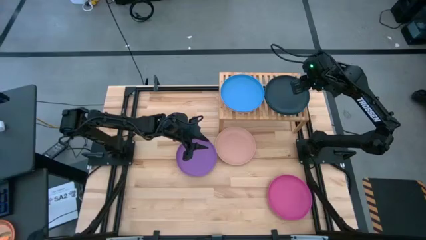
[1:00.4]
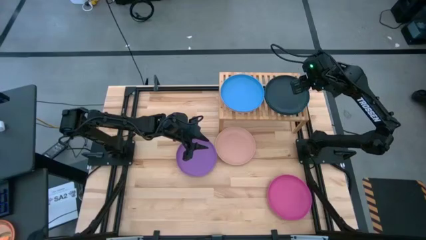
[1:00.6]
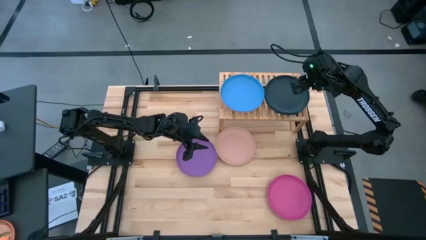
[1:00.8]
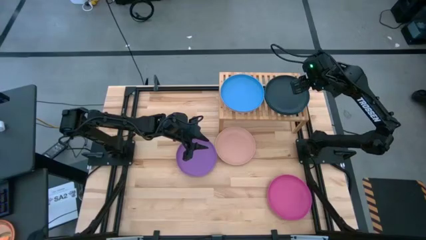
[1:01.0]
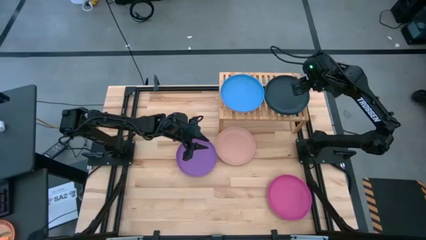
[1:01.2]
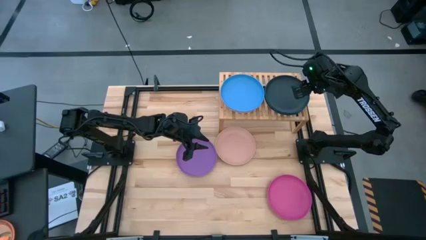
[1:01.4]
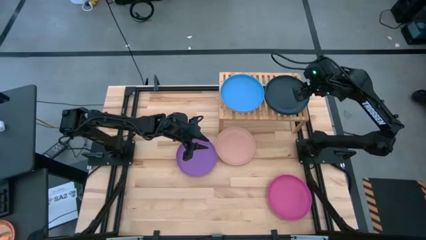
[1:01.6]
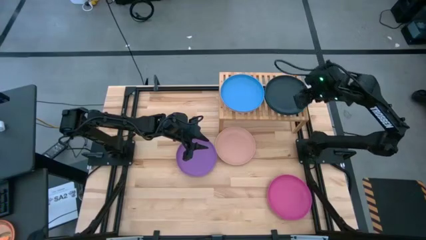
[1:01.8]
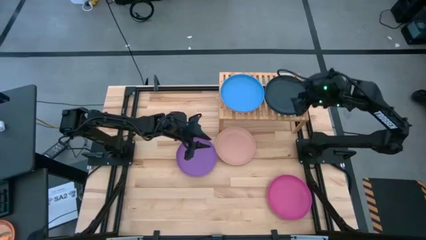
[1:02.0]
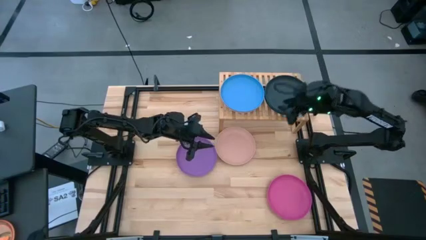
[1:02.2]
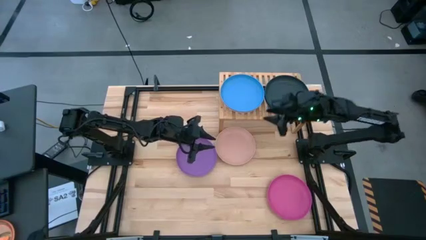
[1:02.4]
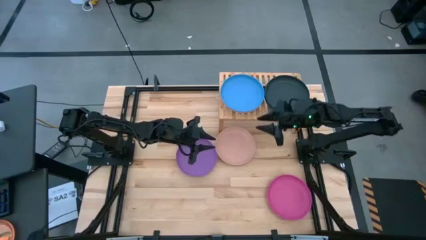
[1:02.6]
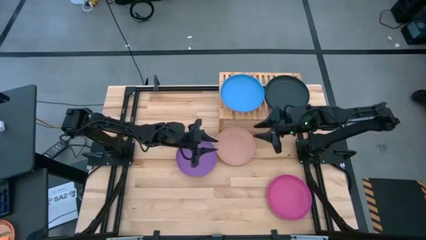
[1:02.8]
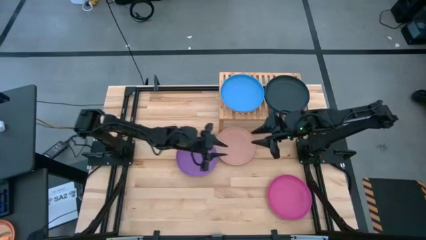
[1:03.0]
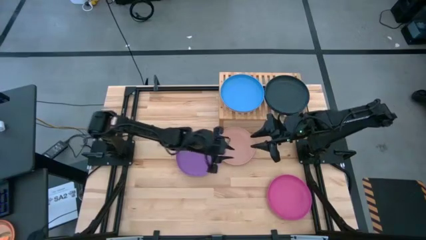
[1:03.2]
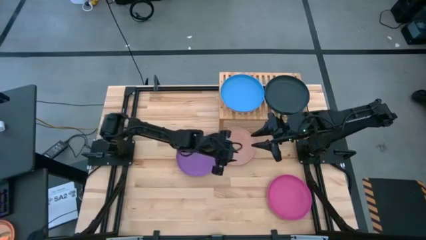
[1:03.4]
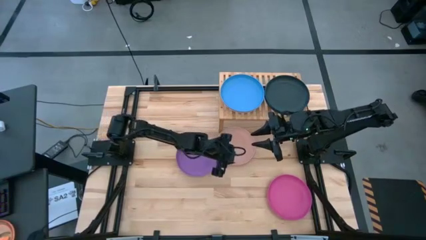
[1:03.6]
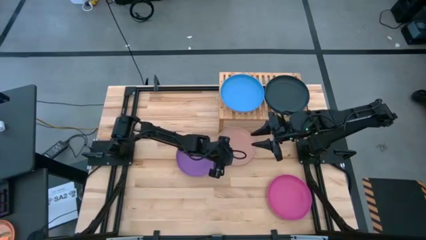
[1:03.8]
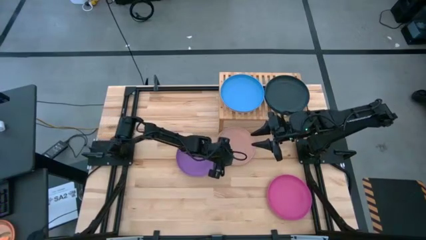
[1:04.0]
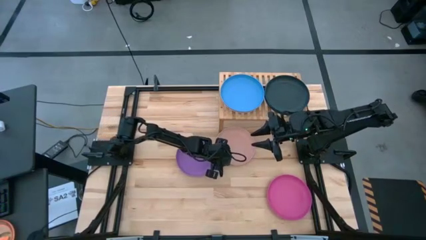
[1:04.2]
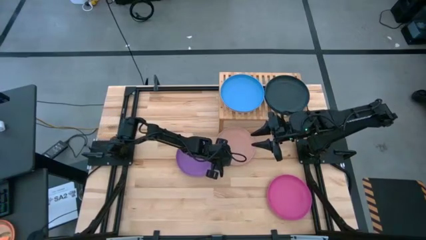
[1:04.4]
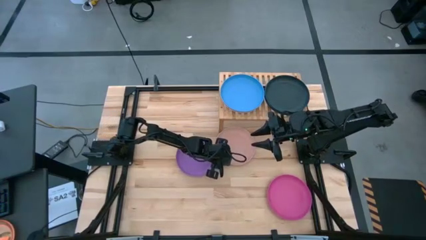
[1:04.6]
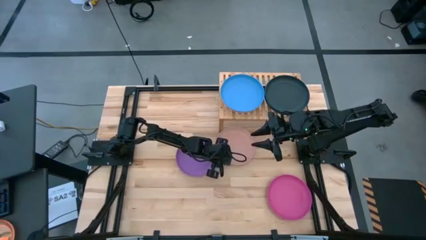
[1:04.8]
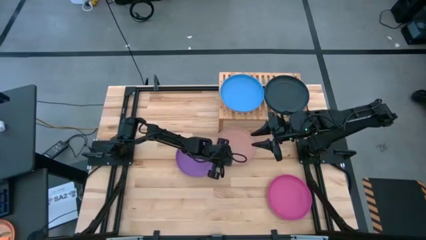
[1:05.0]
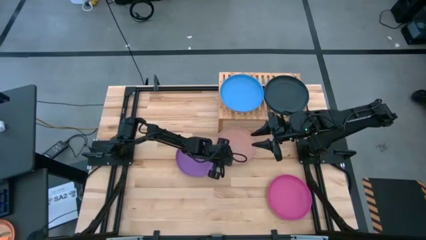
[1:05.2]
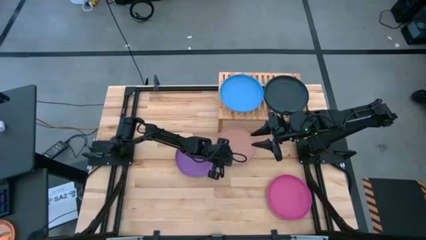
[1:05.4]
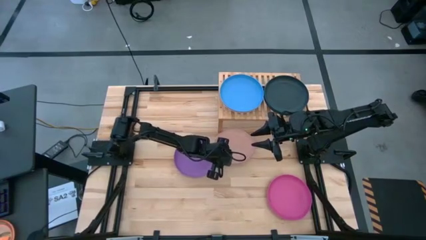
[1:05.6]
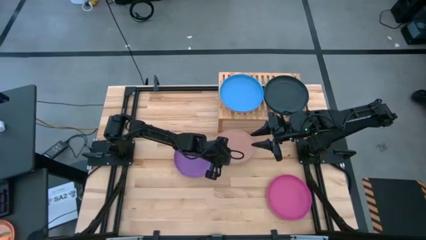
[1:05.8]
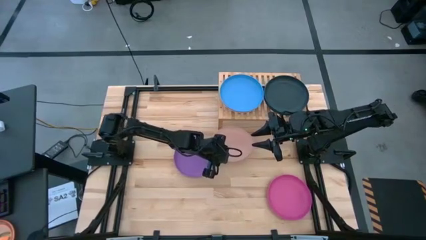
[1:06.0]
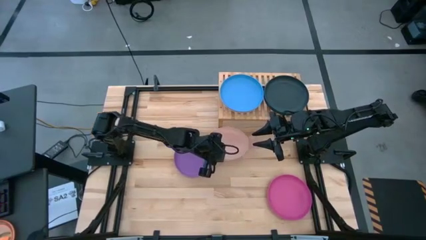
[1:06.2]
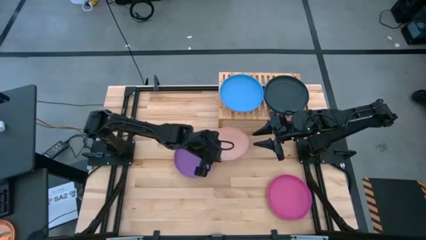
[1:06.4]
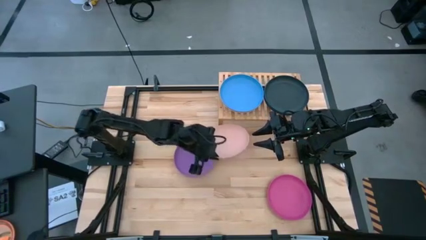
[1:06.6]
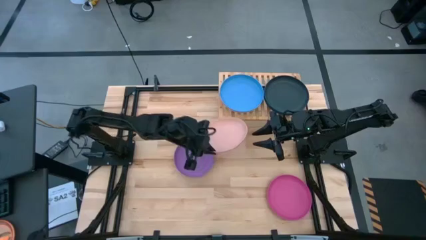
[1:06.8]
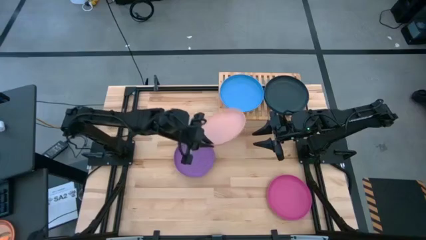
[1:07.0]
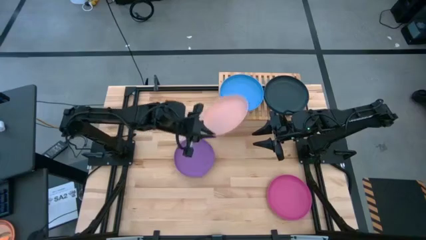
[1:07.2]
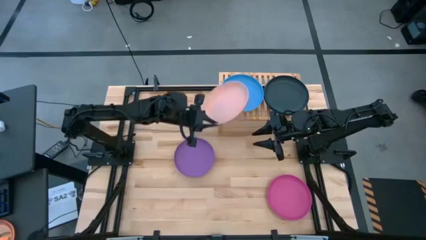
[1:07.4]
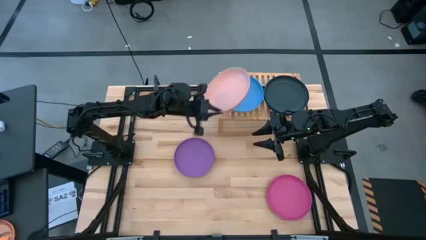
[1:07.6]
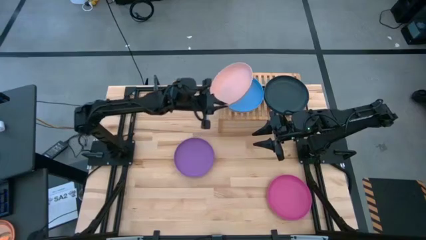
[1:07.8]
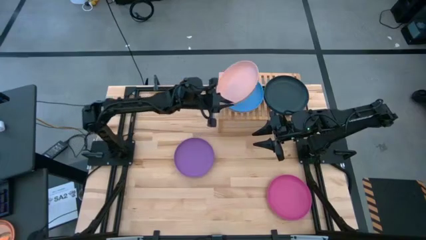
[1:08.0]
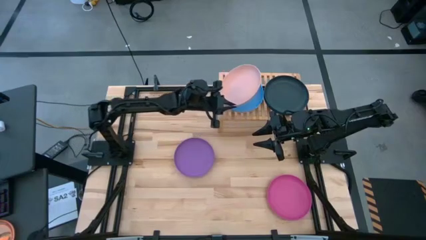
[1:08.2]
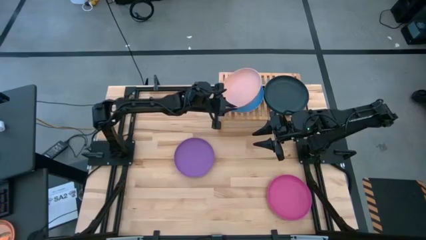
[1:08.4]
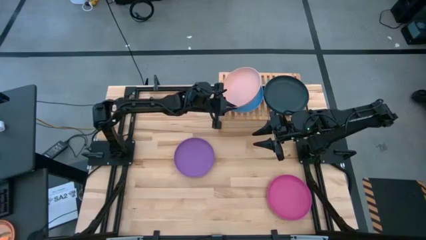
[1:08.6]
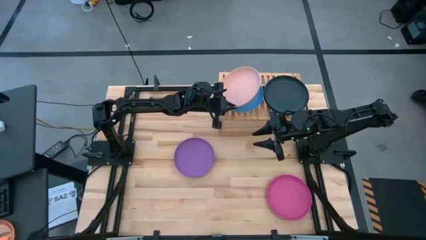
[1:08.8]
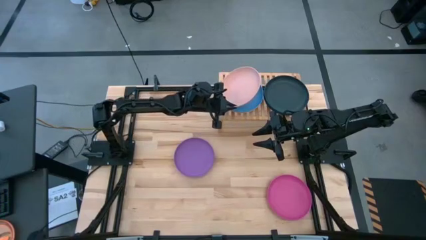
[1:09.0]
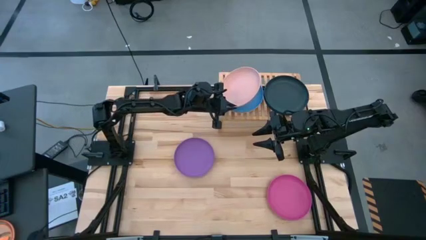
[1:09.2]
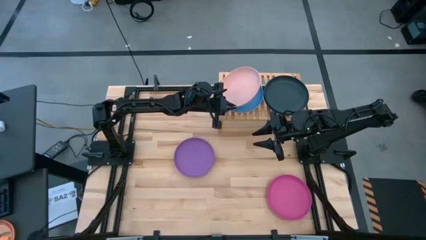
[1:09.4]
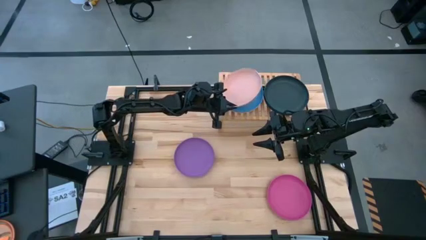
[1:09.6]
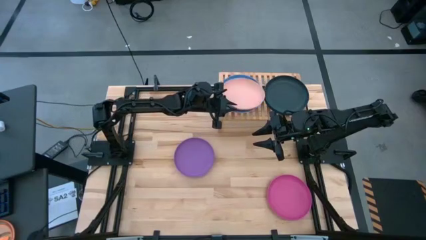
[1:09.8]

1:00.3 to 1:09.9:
Task: Place and stack plates onto a shelf
Stack the light orange plate on top of the blue plate on the shelf

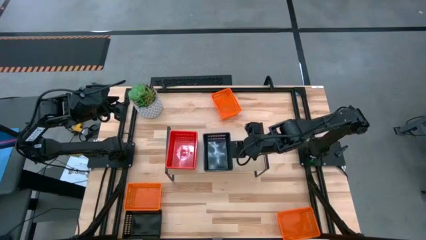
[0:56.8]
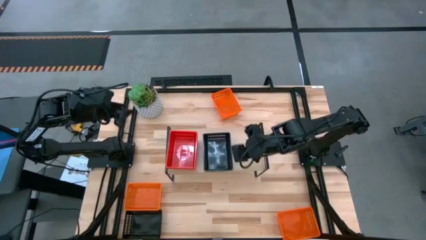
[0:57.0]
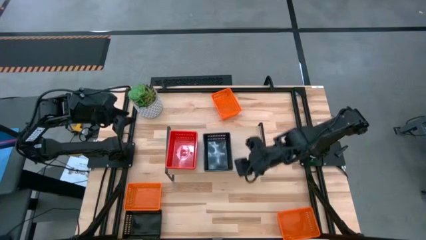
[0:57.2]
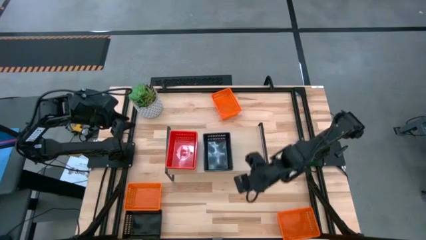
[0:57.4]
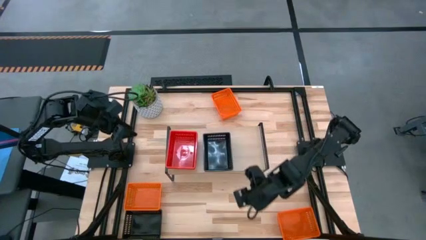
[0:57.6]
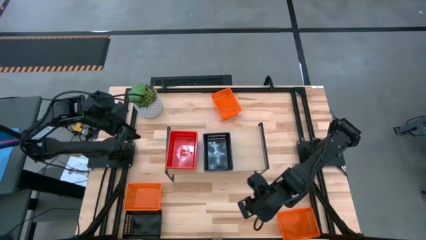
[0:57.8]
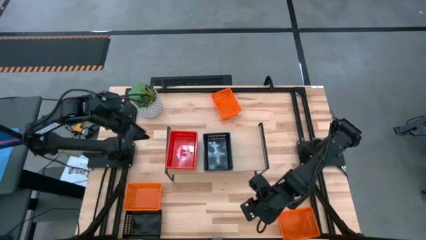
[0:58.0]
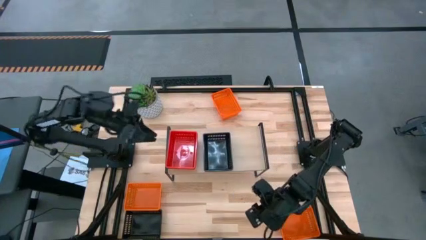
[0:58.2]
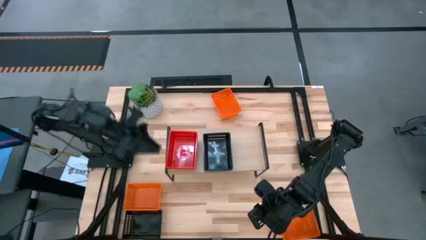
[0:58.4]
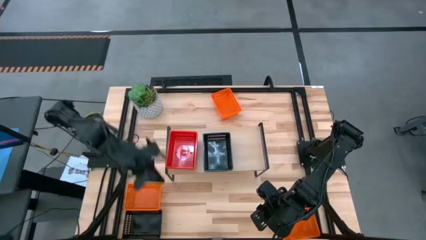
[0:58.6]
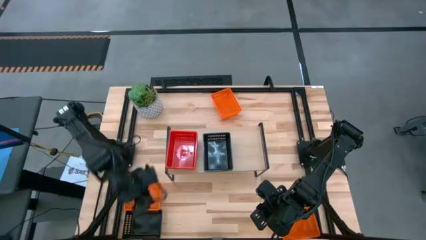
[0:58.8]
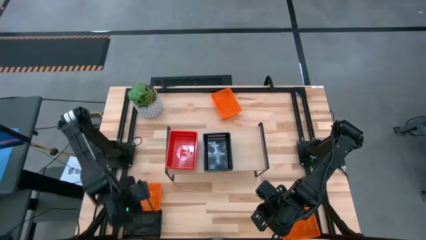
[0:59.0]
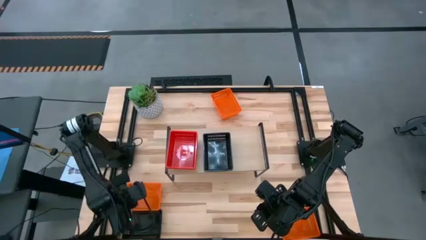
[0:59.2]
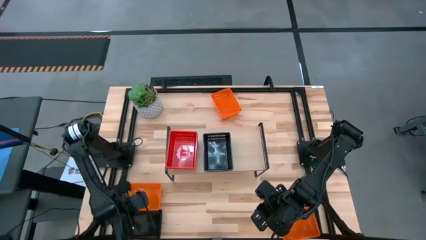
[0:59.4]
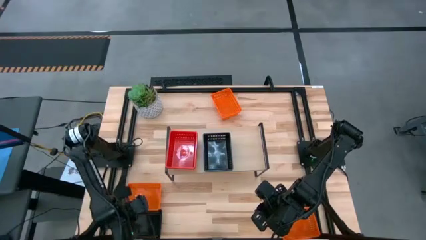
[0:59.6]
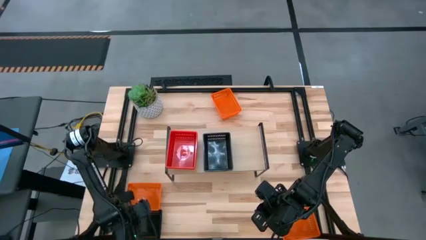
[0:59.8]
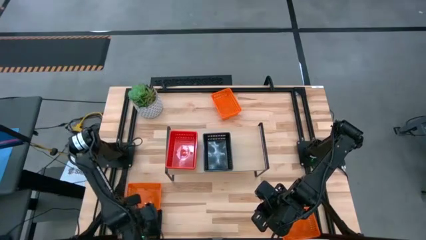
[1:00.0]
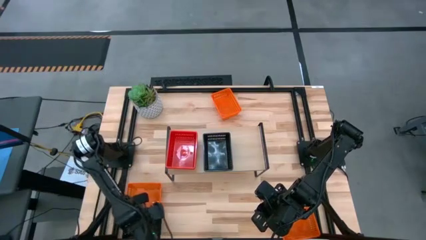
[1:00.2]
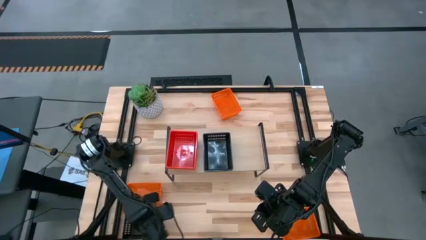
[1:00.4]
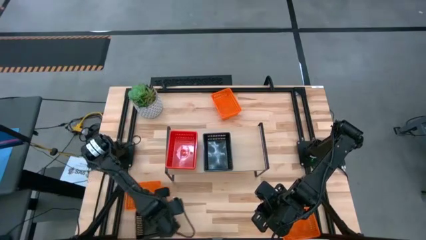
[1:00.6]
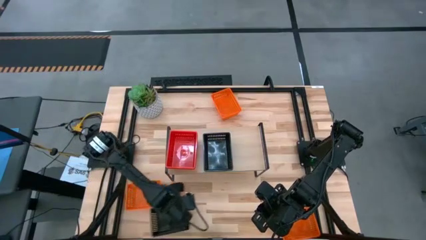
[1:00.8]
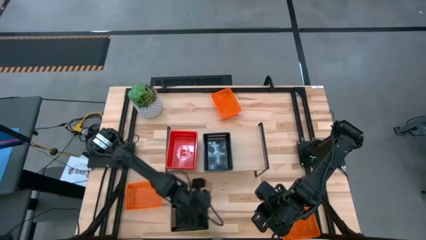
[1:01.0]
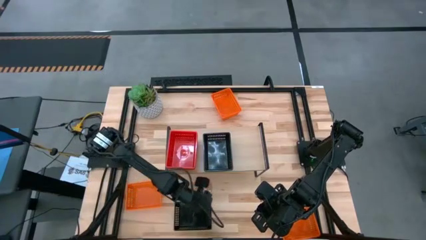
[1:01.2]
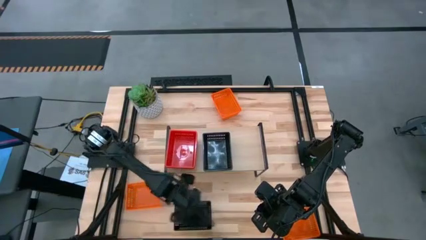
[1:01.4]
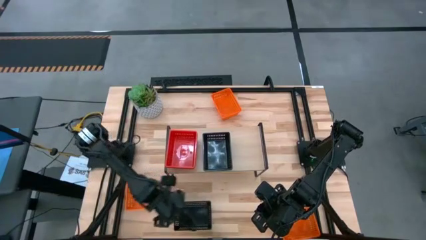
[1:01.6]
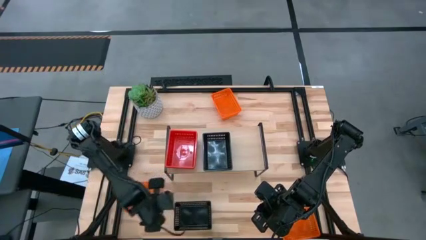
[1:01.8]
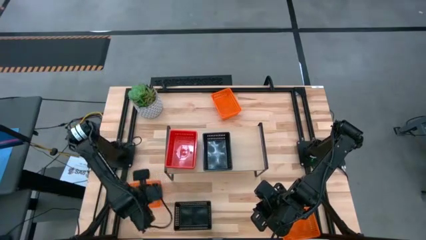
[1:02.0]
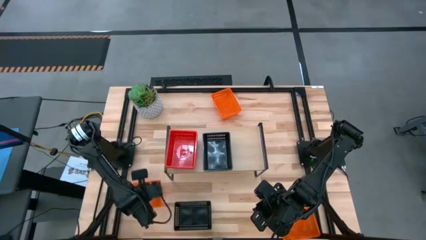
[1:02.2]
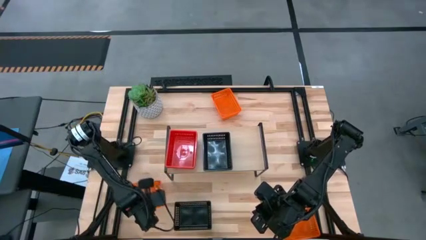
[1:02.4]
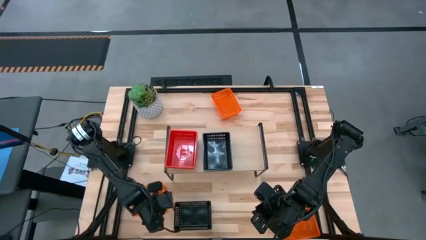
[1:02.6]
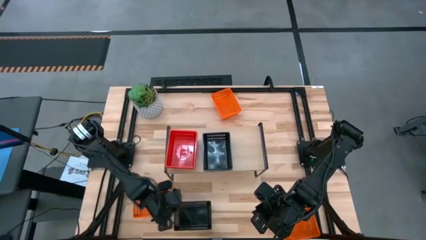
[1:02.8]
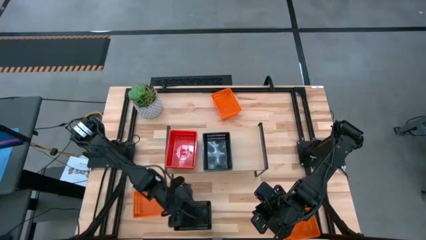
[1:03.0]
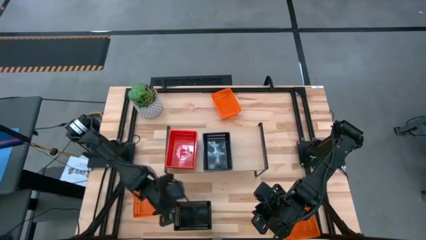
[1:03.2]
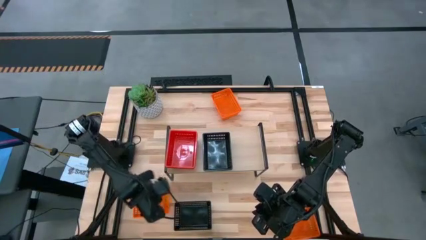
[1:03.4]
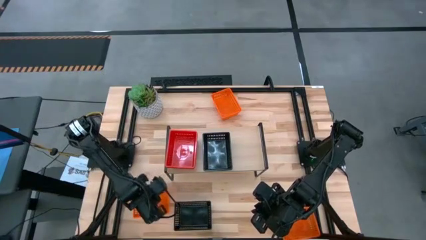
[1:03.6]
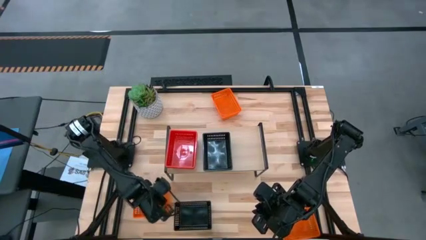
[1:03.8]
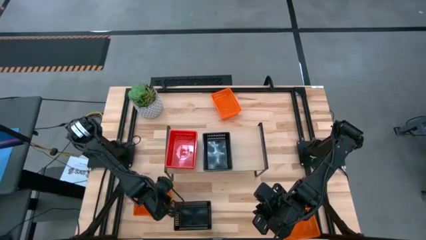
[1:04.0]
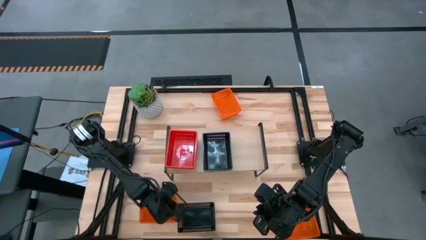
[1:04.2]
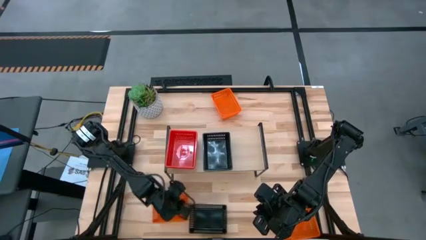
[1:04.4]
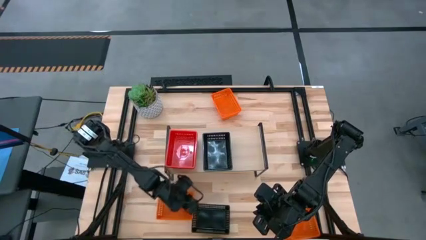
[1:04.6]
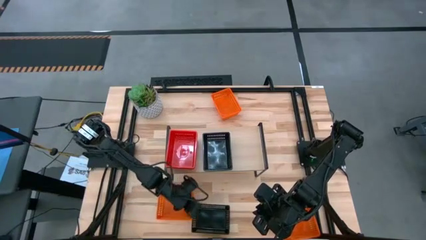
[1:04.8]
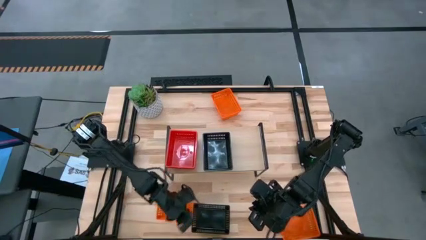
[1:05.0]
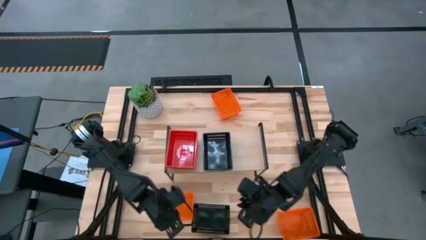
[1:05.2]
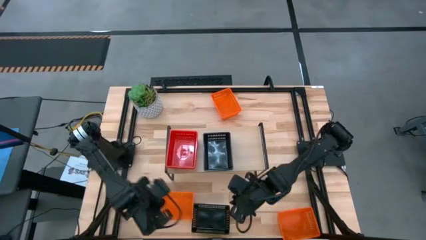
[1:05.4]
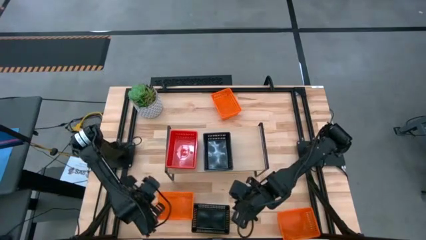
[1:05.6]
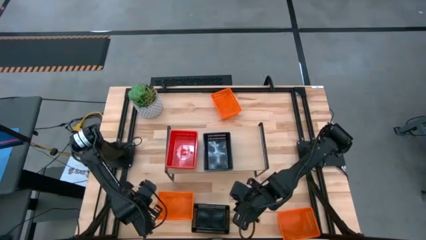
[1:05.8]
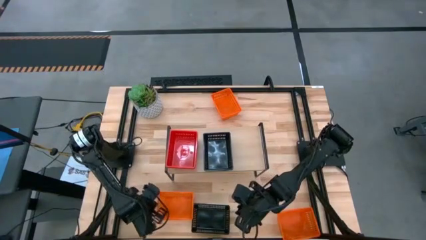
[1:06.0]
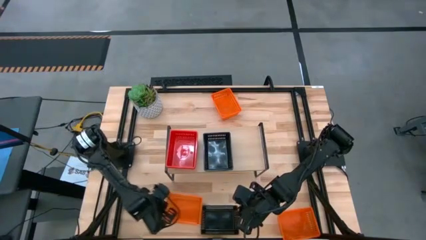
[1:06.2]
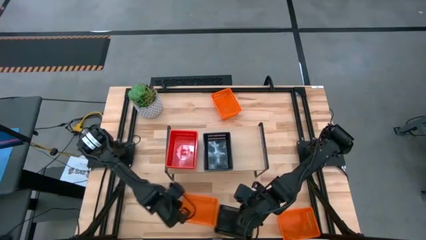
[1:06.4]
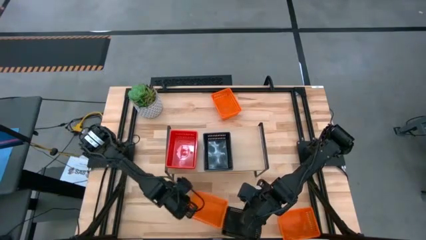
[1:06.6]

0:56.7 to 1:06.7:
Task: Stack baskets on shelf by color
Move the bins to the bottom center of the table
